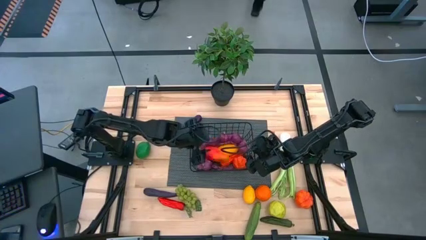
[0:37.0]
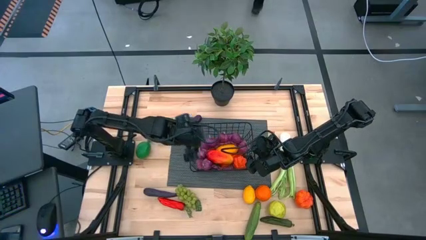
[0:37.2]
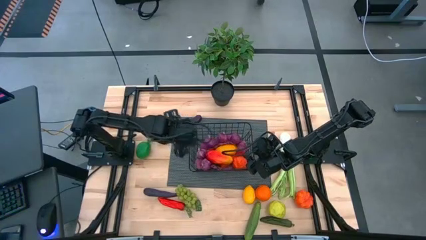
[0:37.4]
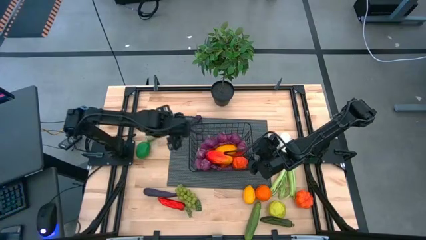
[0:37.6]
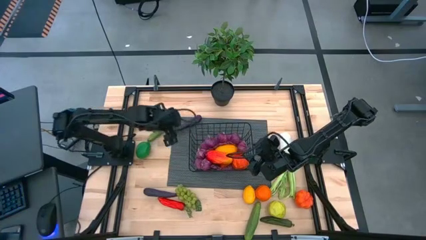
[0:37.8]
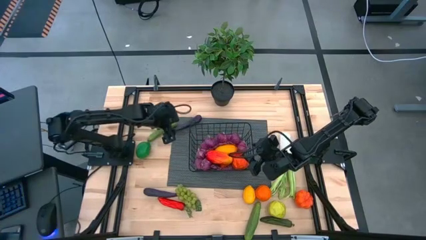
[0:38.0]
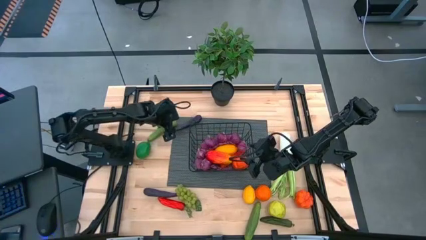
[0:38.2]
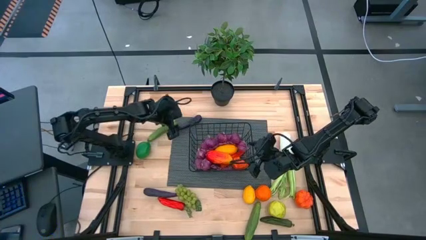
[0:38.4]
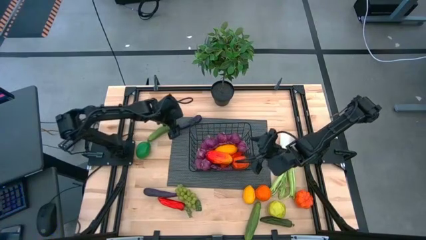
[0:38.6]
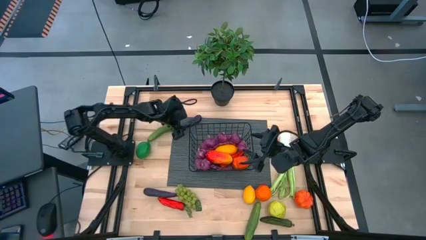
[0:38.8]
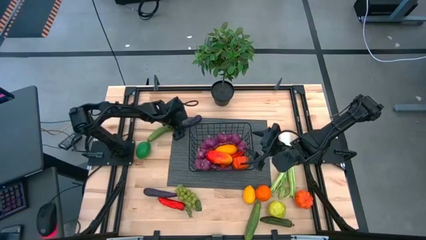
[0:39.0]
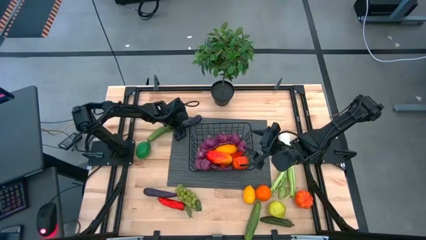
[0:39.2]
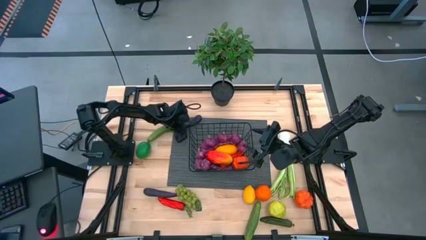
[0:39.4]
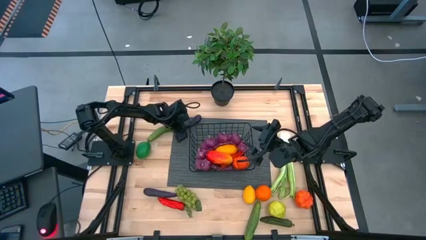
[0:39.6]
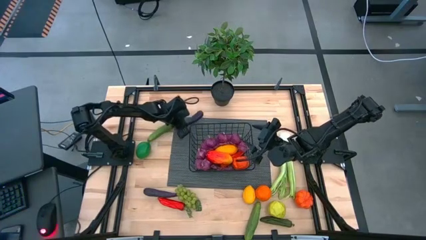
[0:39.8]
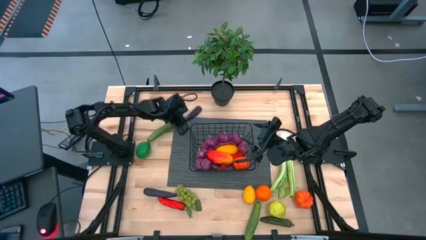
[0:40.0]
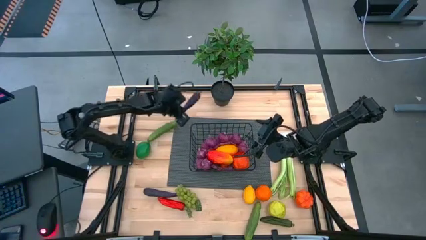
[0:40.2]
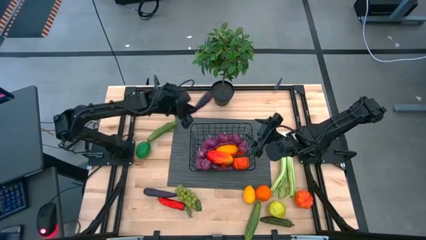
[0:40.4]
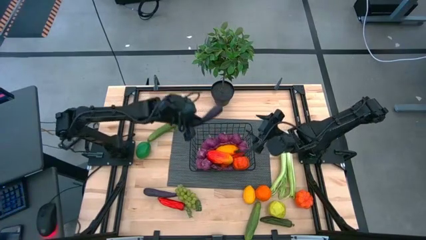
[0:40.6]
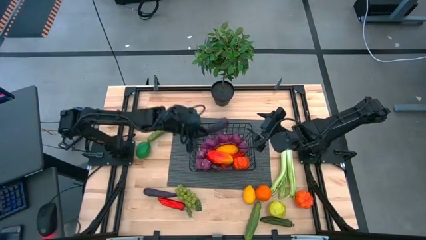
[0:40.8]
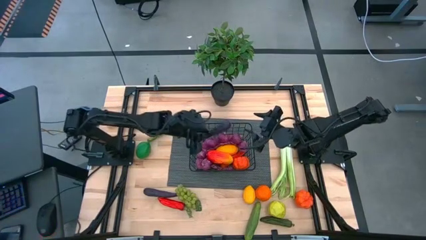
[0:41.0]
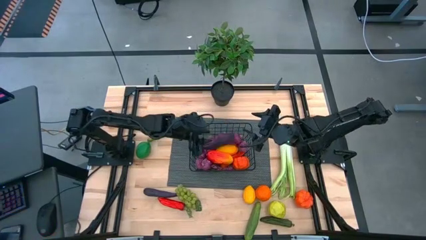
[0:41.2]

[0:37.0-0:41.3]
Task: Build produce basket
Put the eggplant into the wire basket

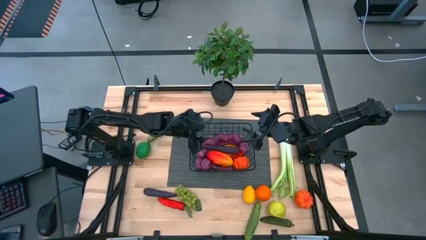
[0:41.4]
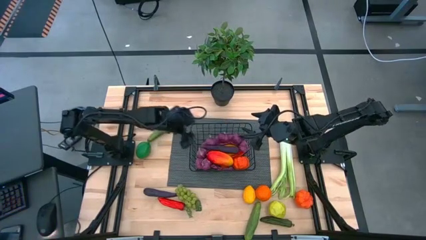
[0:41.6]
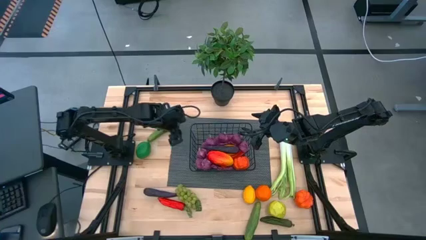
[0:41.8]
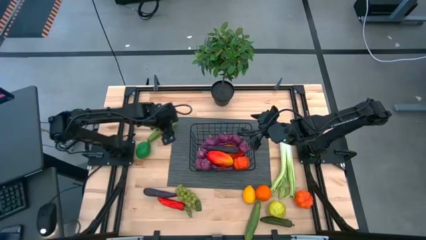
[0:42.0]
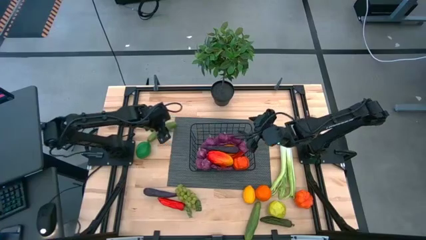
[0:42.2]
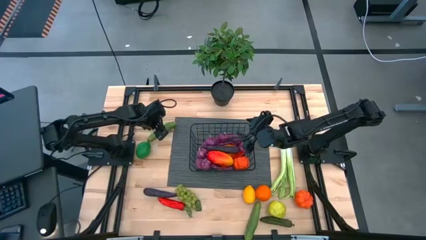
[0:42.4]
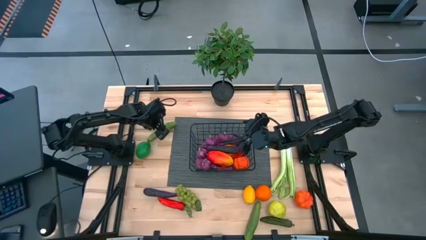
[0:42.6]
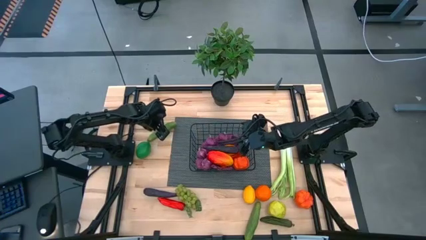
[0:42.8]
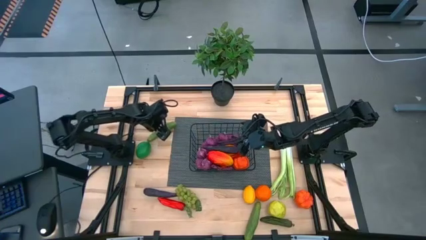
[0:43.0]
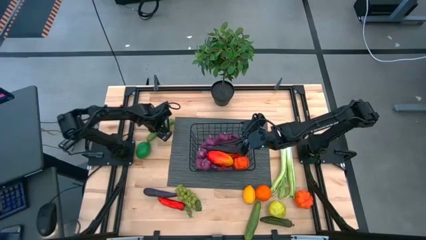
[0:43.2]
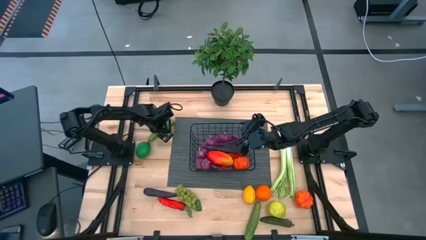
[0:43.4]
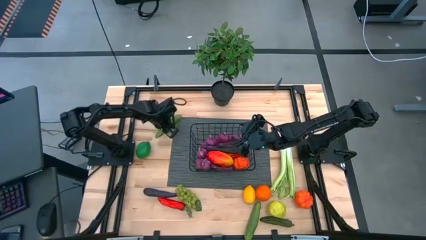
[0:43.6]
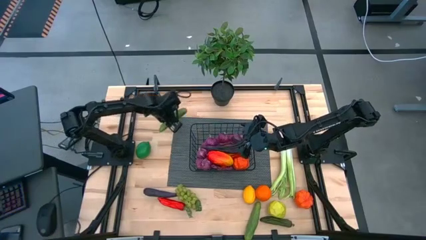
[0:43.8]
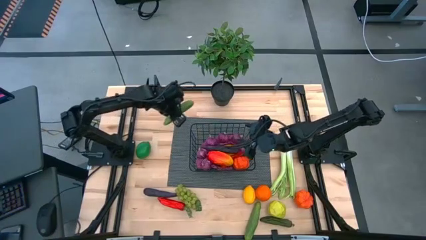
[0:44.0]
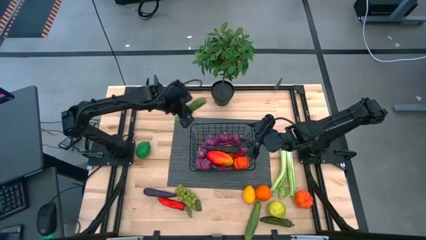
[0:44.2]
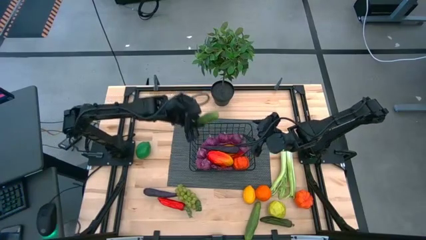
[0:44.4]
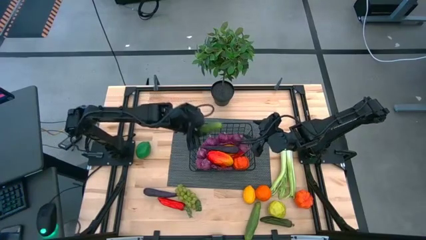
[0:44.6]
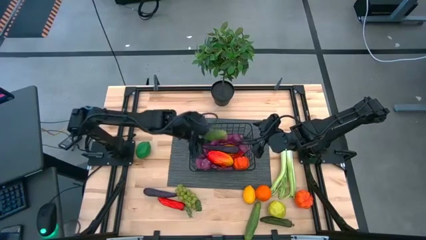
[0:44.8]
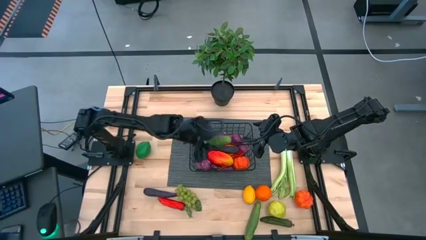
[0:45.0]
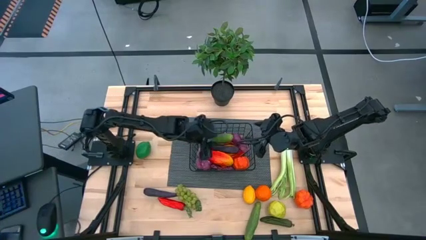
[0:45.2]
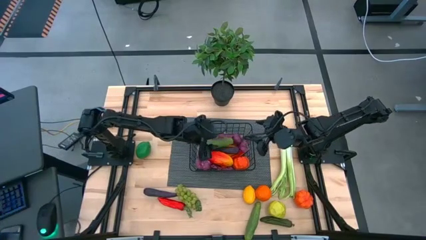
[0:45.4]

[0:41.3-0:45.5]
Put the top cucumber into the wire basket

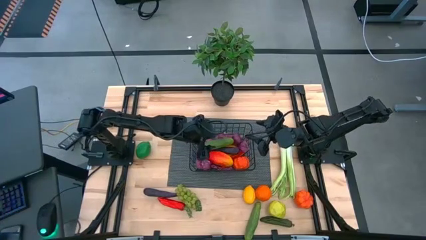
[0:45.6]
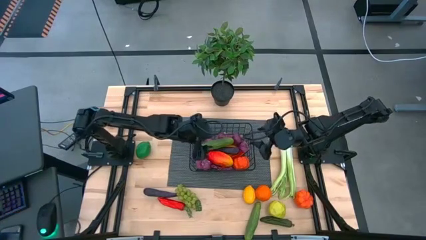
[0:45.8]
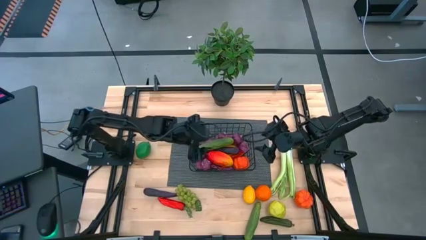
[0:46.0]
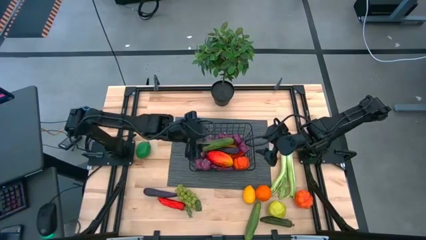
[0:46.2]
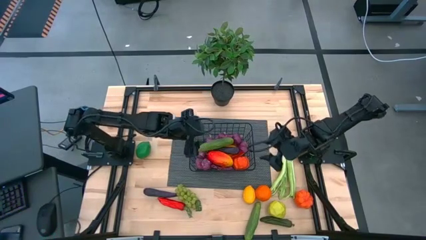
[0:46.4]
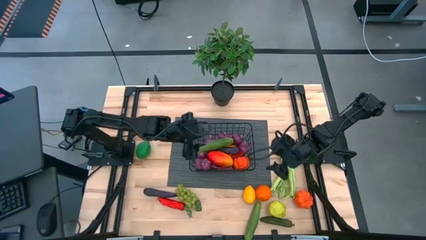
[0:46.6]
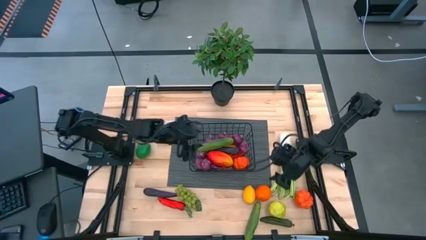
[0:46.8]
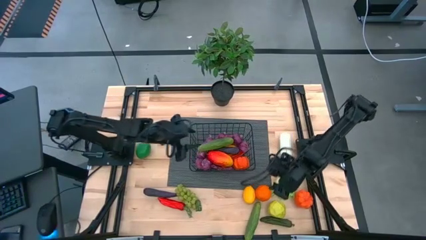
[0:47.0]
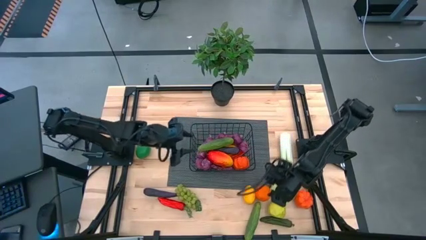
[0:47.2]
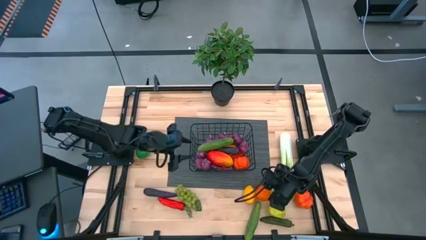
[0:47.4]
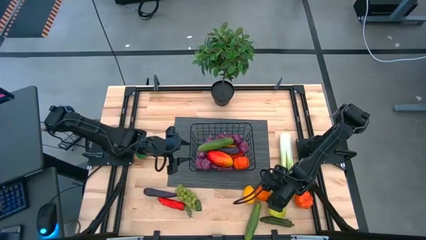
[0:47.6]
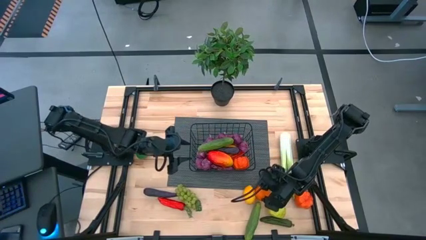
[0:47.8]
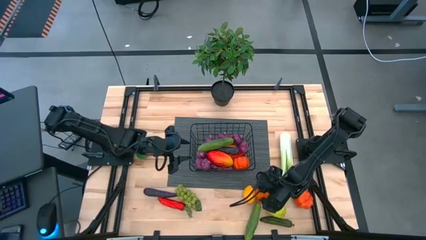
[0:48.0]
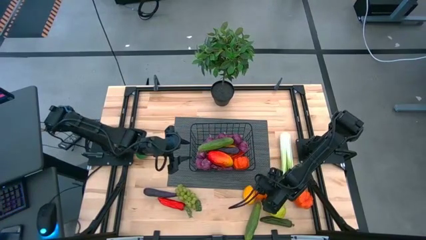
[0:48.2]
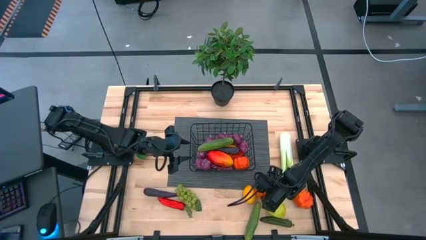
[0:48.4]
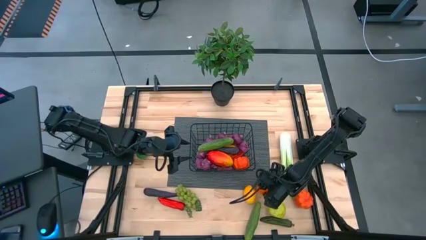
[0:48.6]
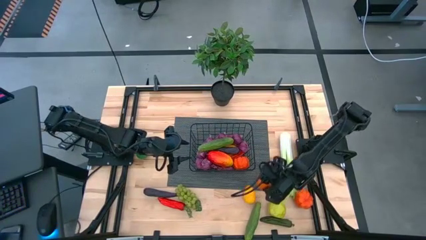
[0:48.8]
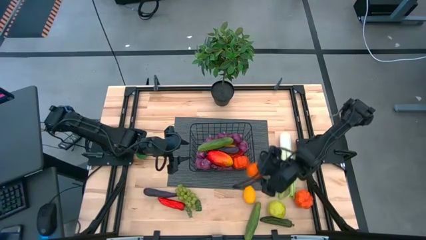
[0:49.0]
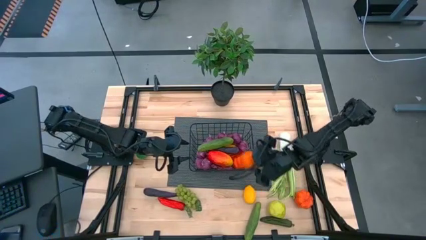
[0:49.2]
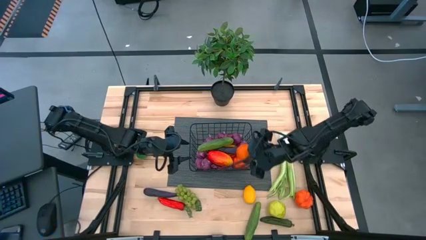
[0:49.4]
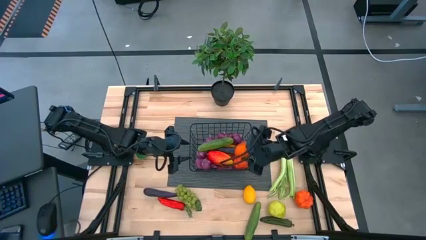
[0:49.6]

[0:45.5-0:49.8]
Put the orange into the wire basket

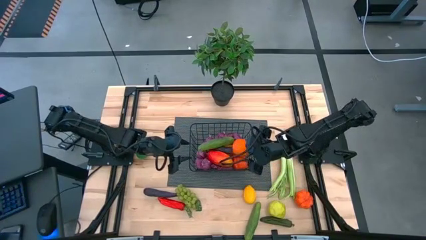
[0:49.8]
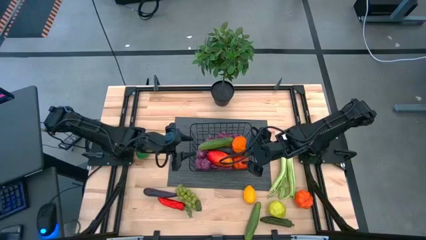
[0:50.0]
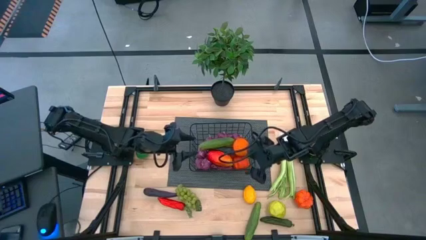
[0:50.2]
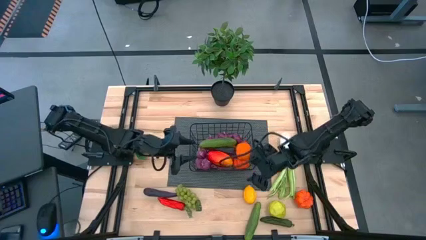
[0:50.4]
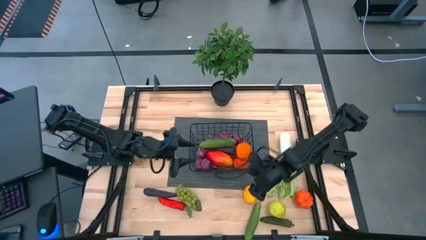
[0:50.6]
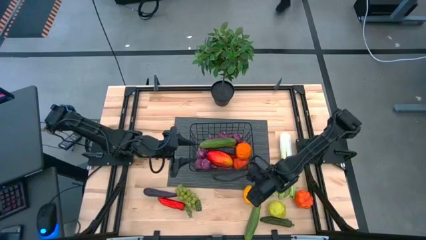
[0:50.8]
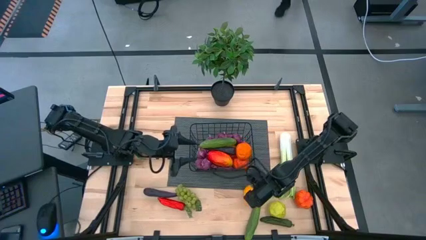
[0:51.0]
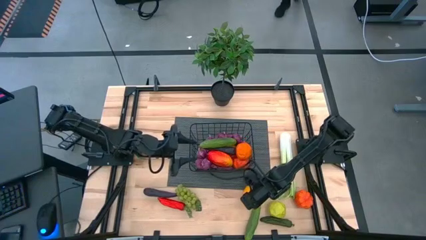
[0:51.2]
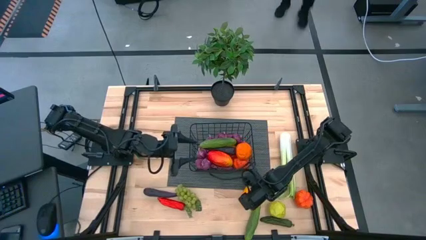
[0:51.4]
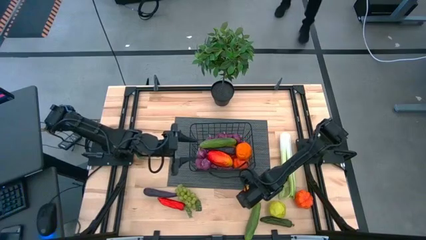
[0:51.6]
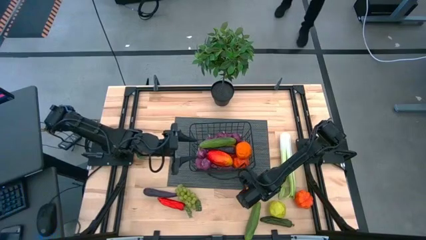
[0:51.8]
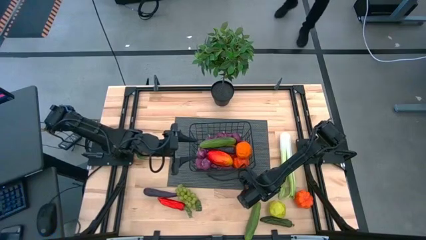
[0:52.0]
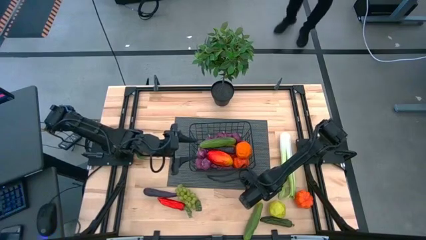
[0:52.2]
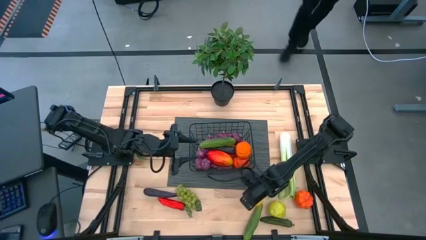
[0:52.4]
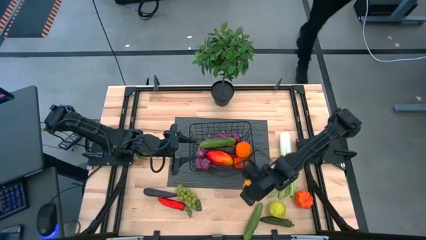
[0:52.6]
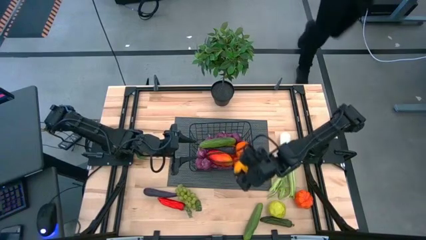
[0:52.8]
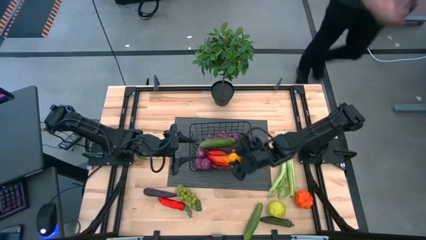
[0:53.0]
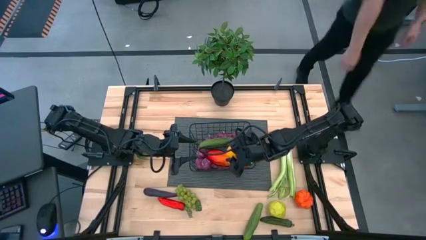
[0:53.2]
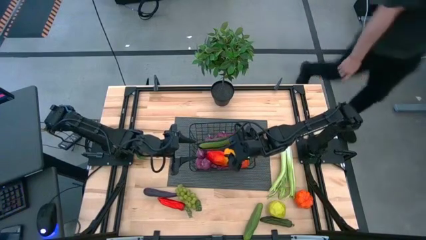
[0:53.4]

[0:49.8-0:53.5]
Put the lemon into the wire basket
